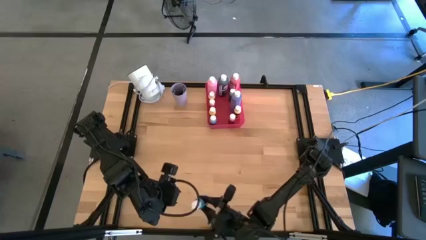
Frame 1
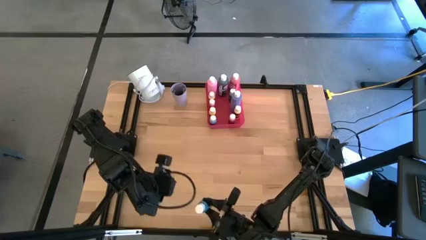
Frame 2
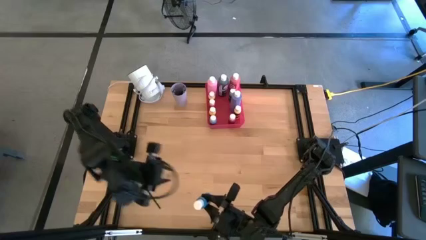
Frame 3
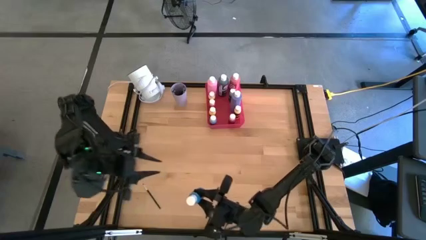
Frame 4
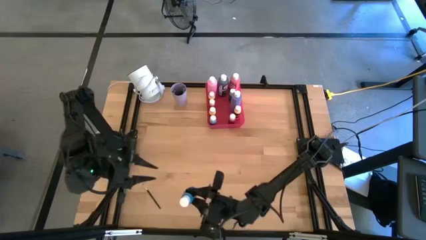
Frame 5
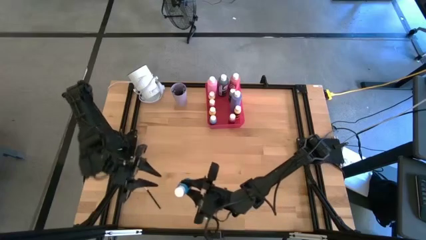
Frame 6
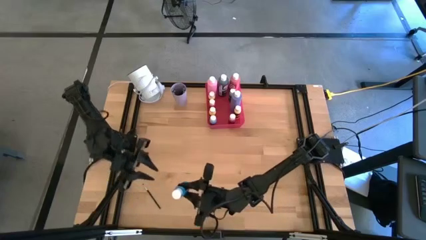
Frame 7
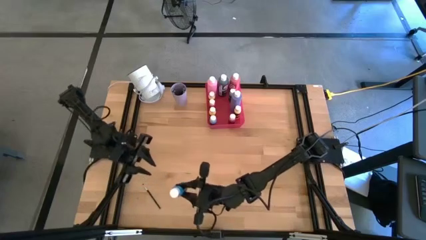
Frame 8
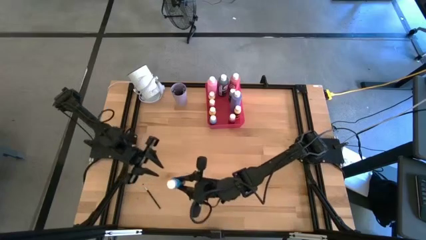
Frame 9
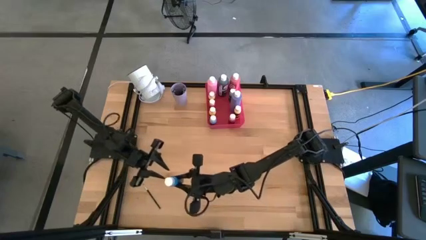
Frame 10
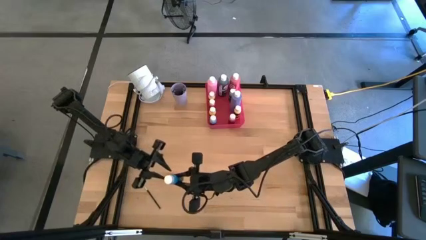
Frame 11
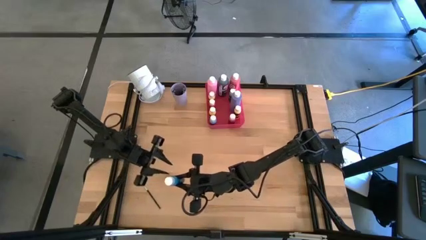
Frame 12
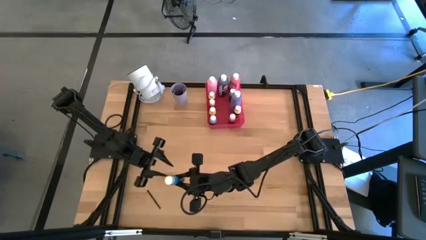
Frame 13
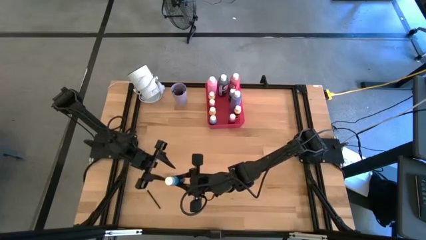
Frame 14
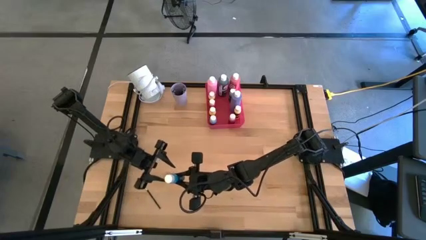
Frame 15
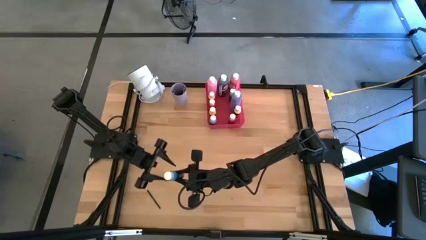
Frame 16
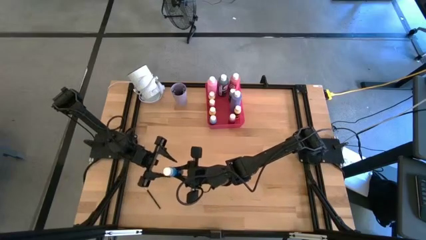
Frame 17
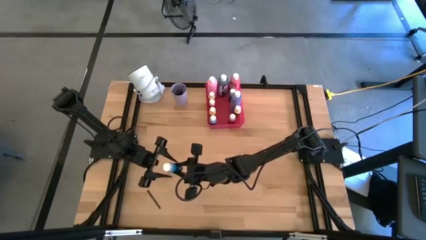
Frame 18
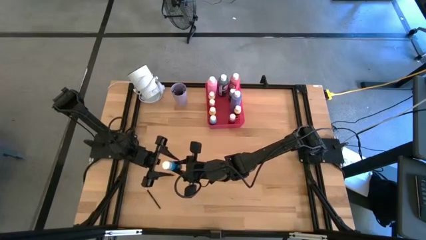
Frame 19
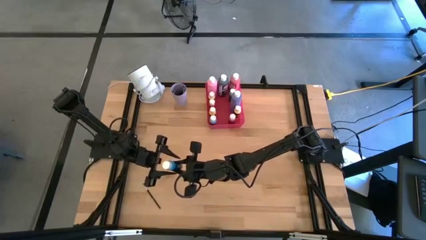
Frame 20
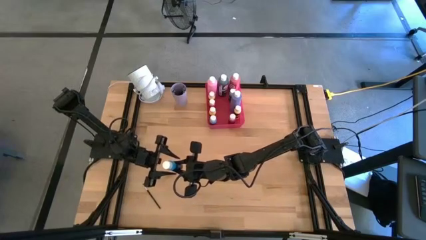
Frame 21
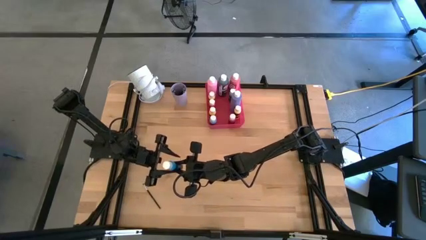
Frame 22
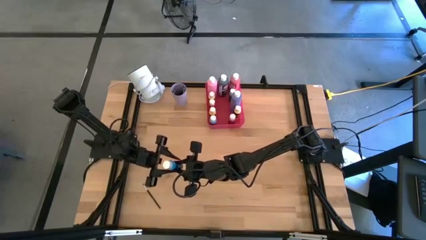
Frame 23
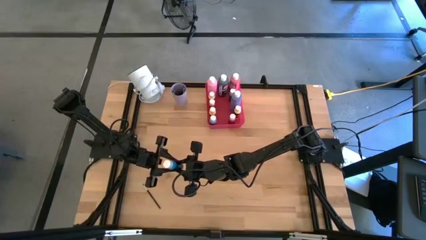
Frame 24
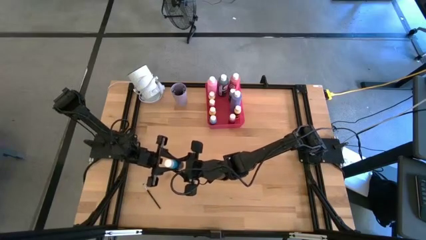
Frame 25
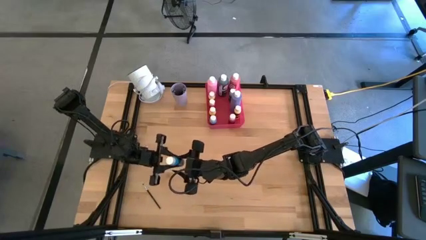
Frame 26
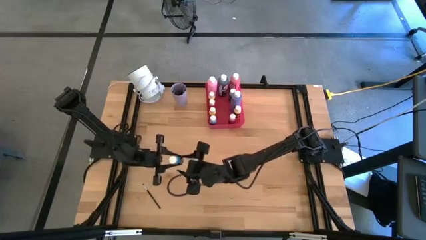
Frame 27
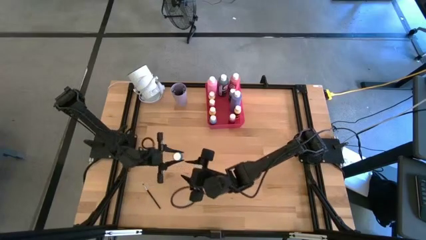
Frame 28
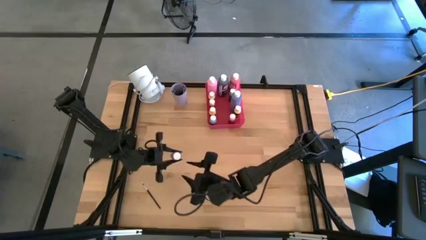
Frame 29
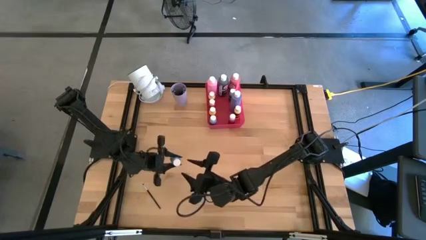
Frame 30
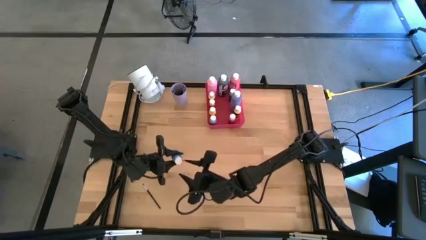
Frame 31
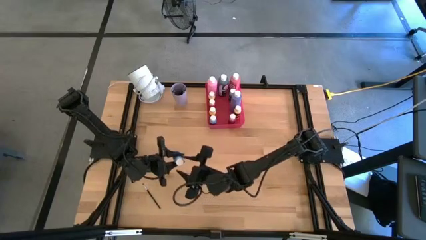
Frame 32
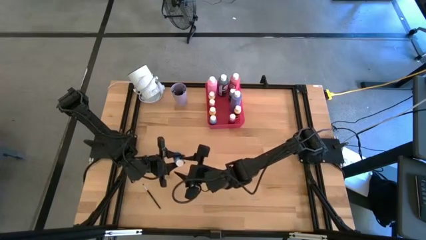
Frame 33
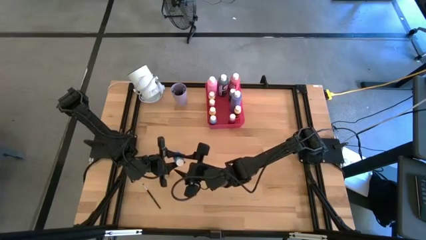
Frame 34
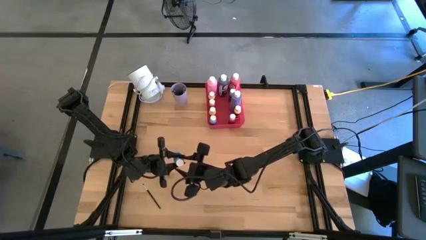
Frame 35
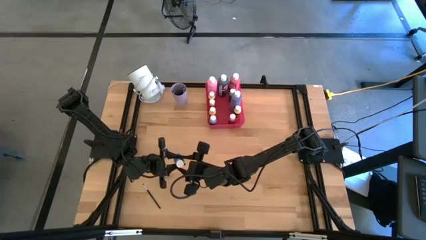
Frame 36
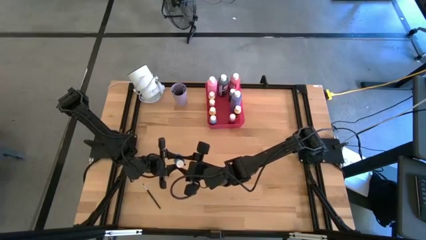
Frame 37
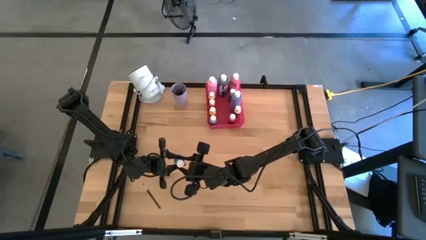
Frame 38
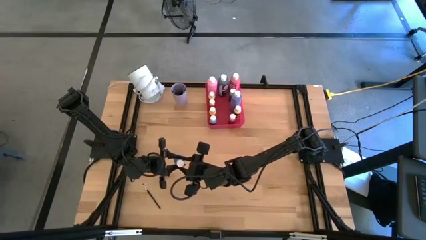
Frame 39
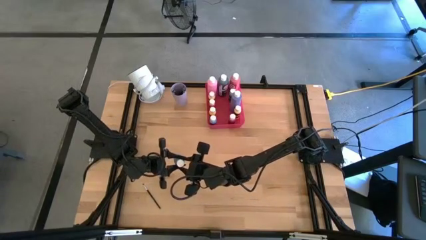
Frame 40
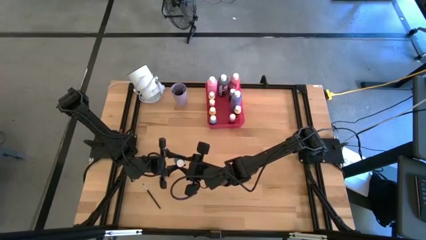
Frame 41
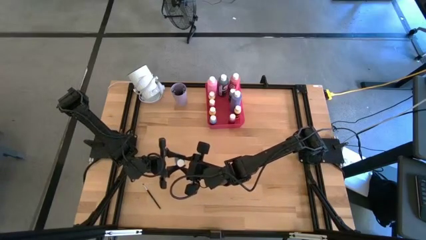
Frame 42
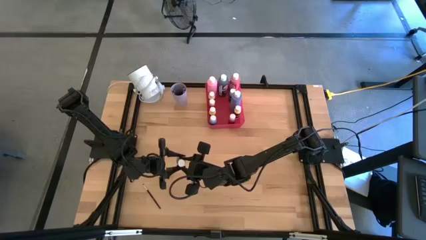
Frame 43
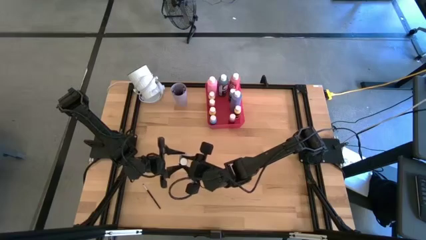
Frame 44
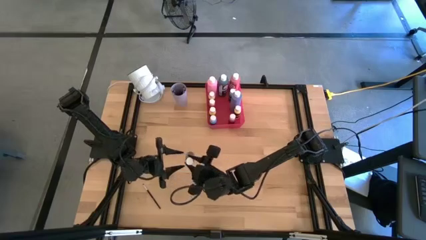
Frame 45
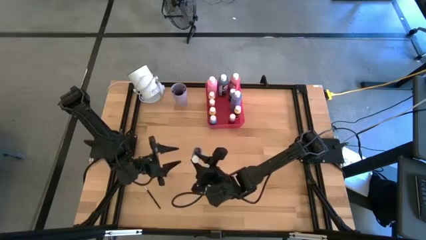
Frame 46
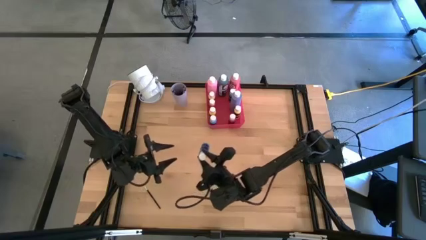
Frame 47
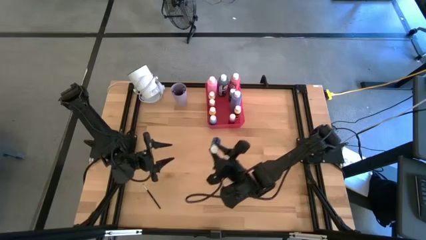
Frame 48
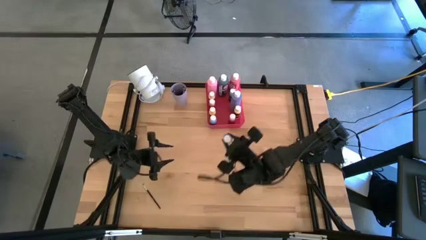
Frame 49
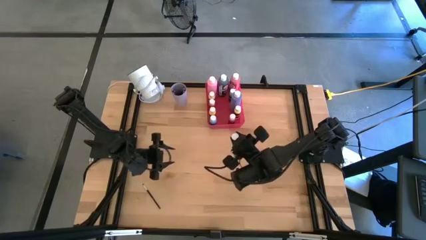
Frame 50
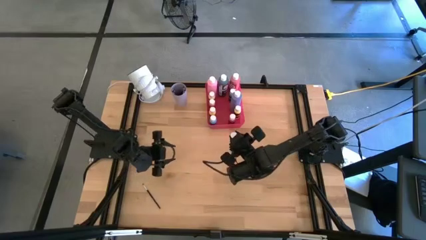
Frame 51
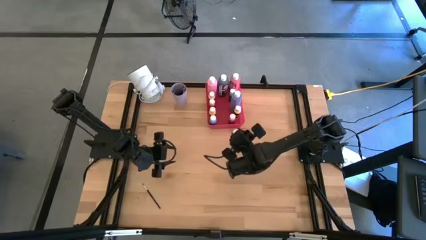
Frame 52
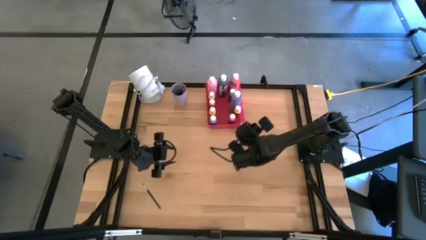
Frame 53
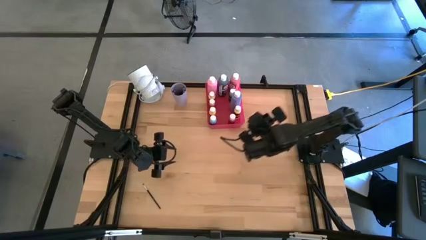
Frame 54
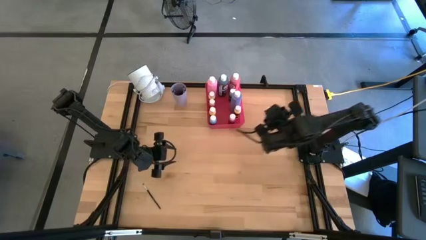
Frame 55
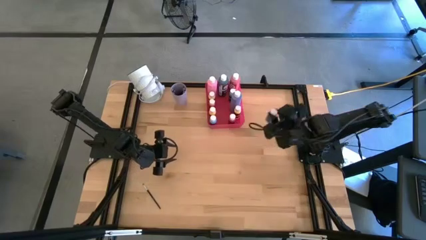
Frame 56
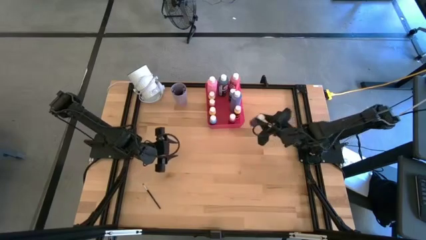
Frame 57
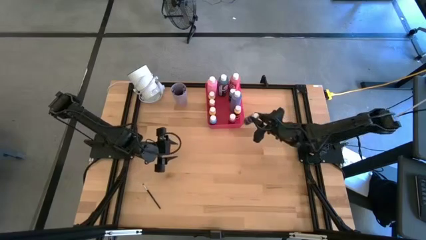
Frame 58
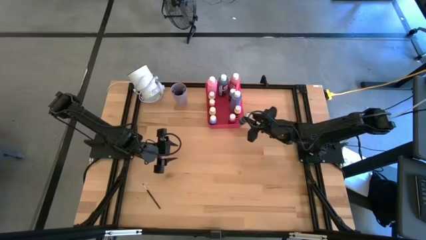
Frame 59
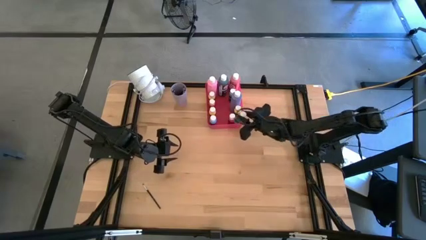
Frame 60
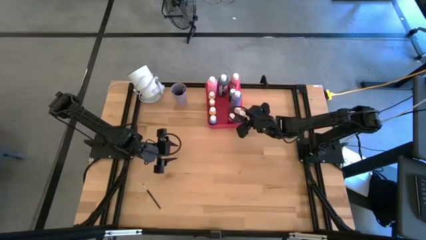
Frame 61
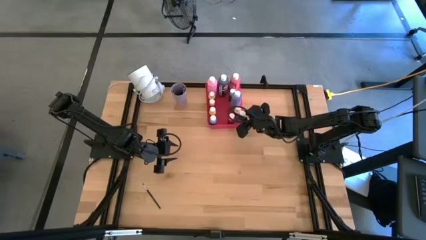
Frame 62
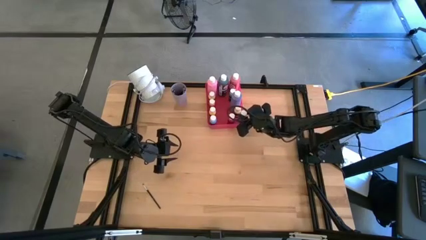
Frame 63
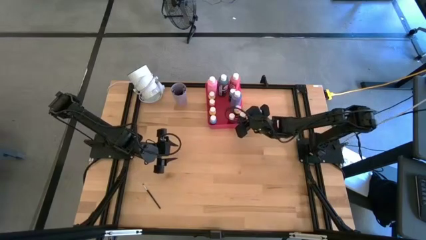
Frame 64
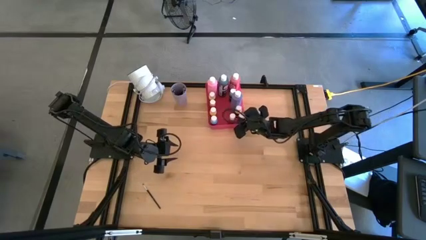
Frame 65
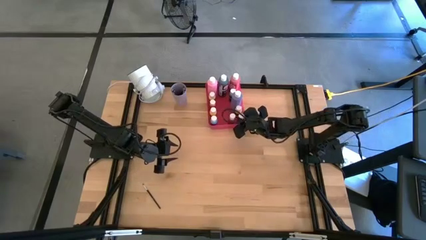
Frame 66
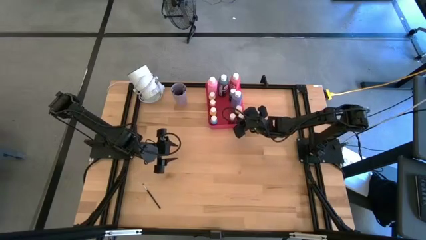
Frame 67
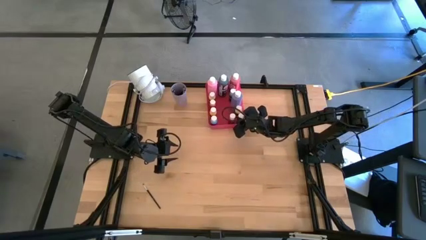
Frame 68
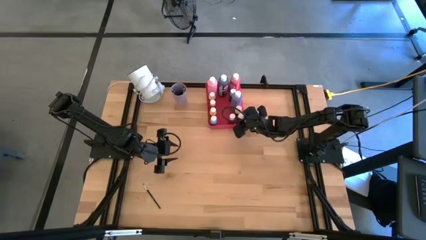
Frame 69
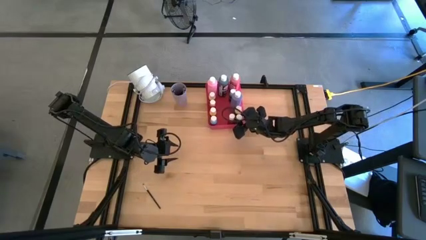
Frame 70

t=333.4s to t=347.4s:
Task: Pick & Place Paint Supplies
Put the blue paint bottle into the red bin

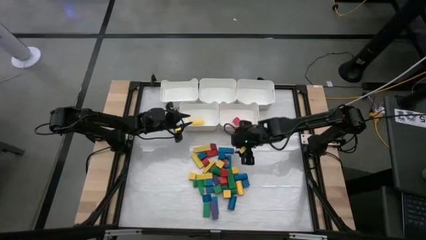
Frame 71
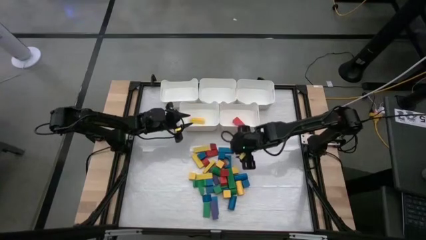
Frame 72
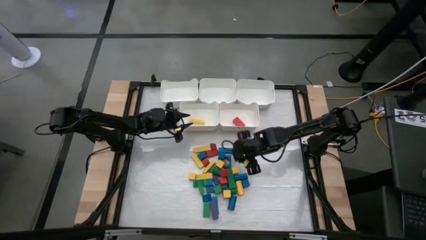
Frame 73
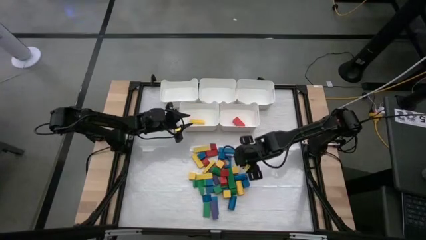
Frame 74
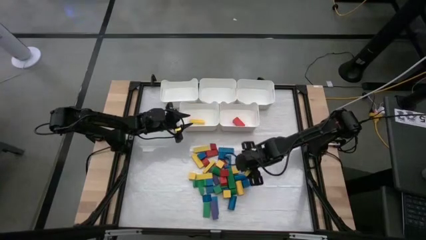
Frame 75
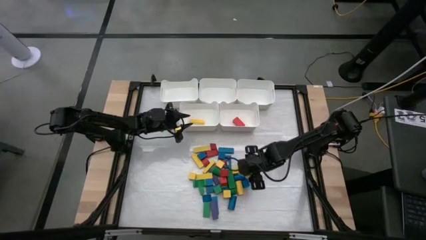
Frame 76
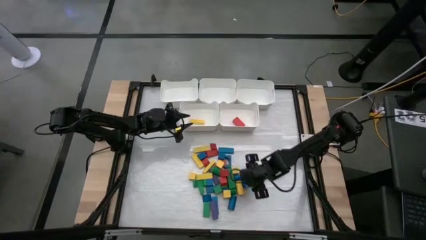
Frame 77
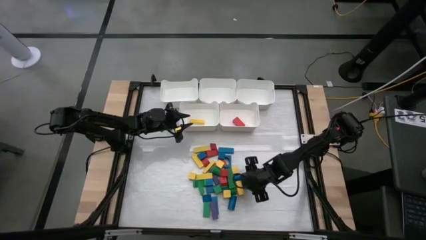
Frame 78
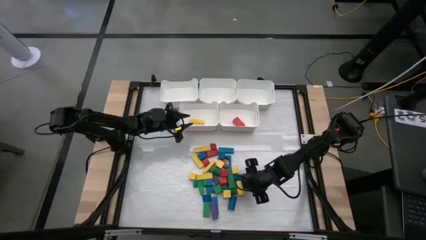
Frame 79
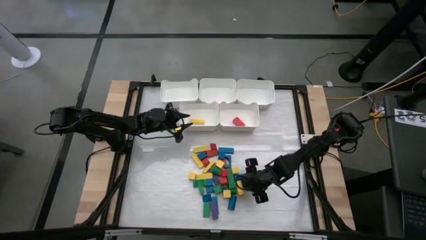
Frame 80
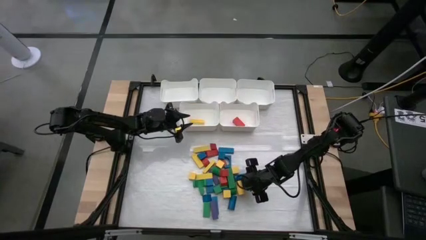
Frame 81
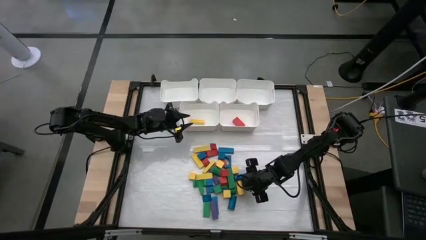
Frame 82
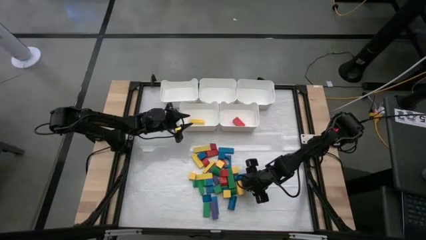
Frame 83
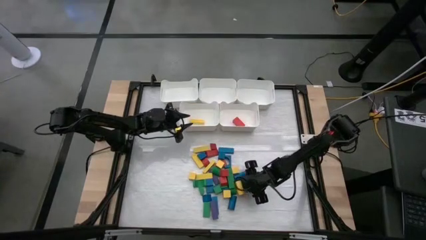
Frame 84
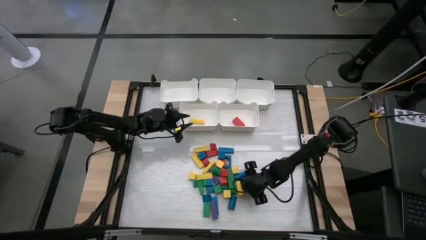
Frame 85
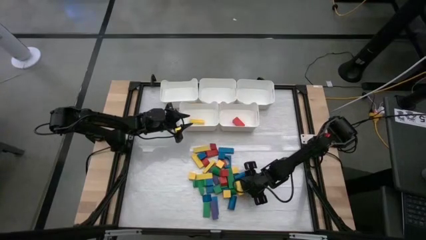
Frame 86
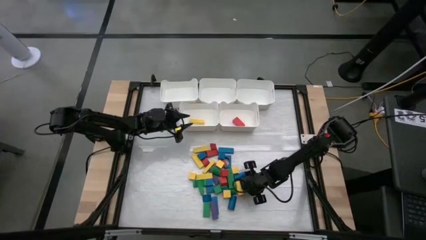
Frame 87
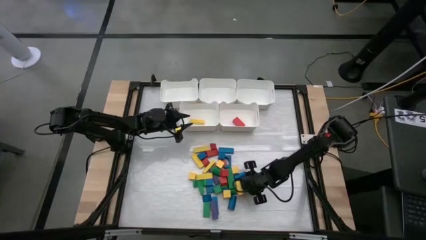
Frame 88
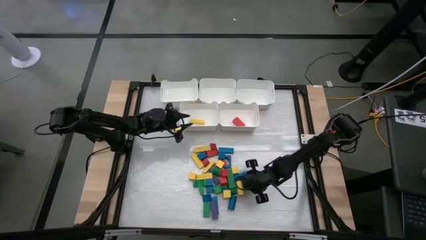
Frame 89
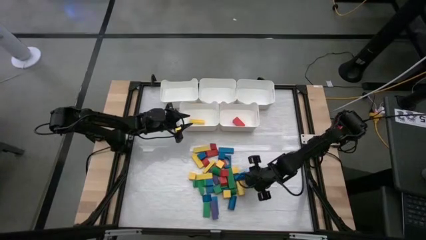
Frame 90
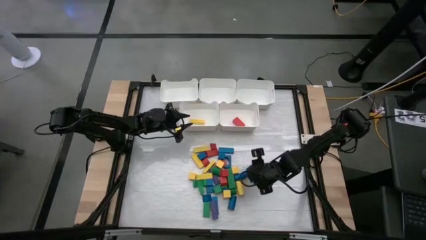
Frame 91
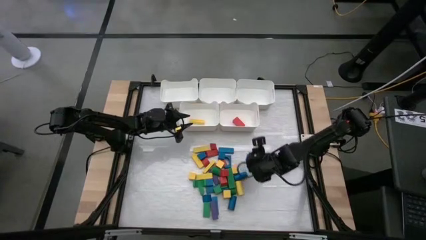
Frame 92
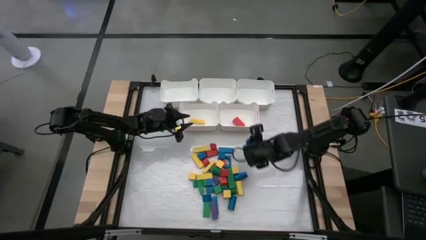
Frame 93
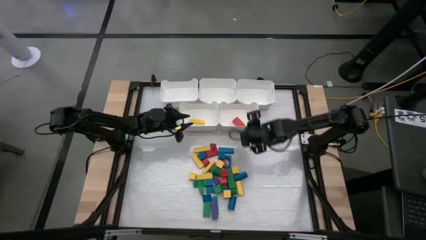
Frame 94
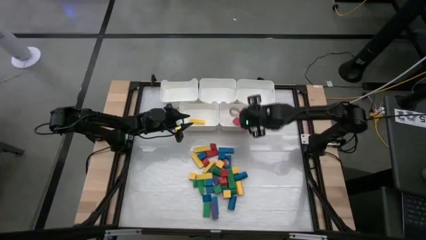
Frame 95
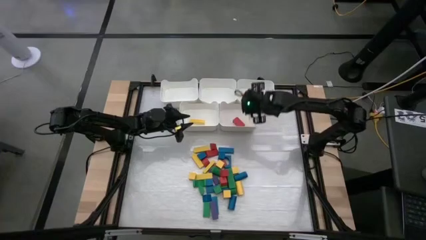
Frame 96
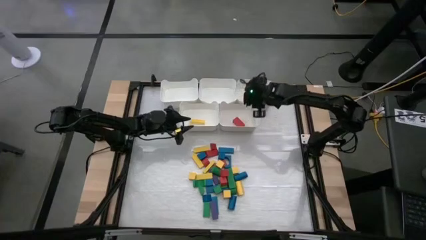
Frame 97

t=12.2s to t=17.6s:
Task: Sort blocks
Put the blue block into the top right bin
